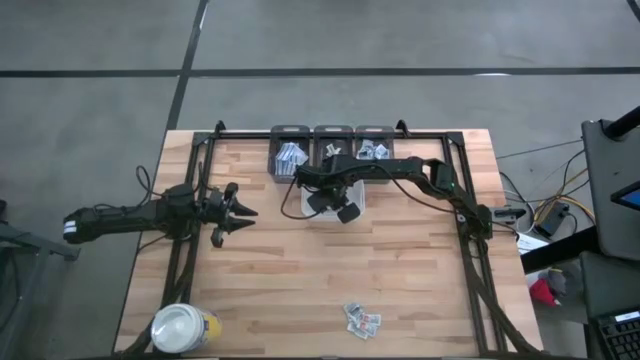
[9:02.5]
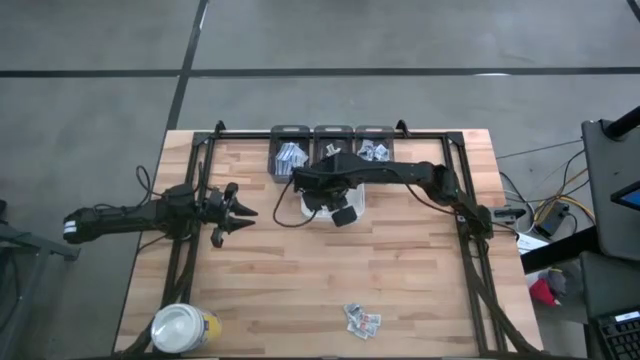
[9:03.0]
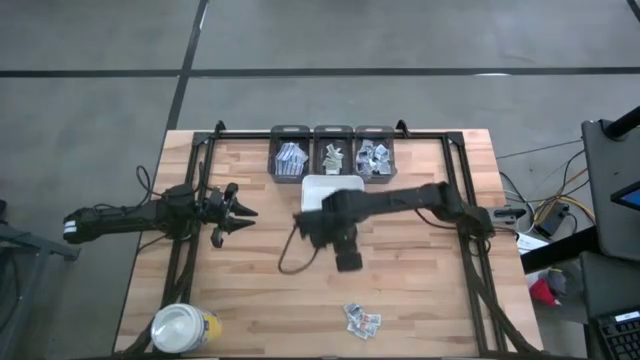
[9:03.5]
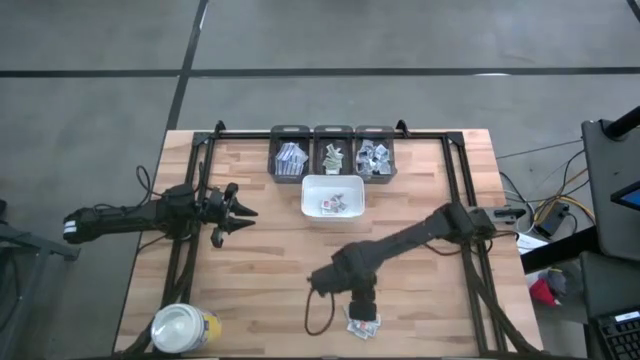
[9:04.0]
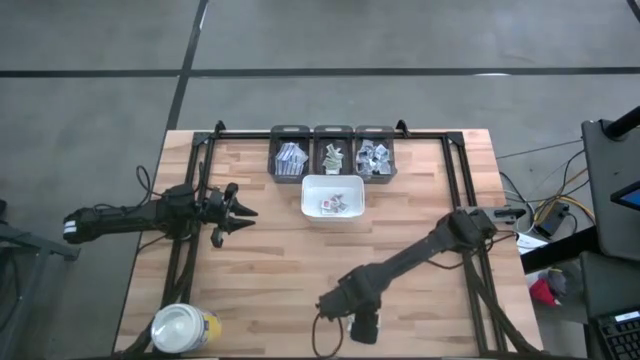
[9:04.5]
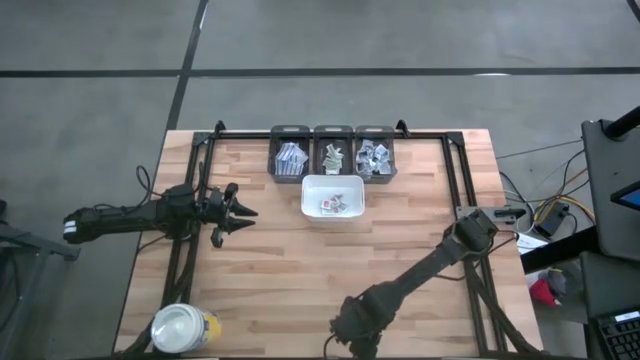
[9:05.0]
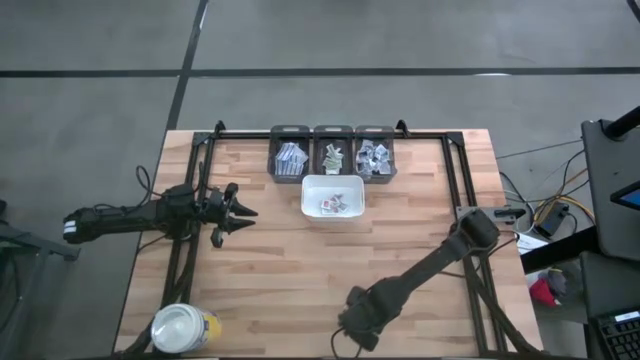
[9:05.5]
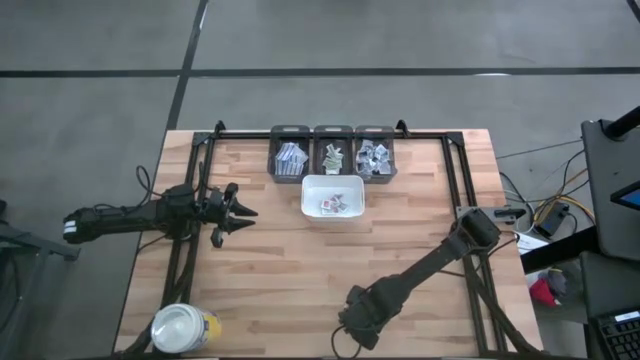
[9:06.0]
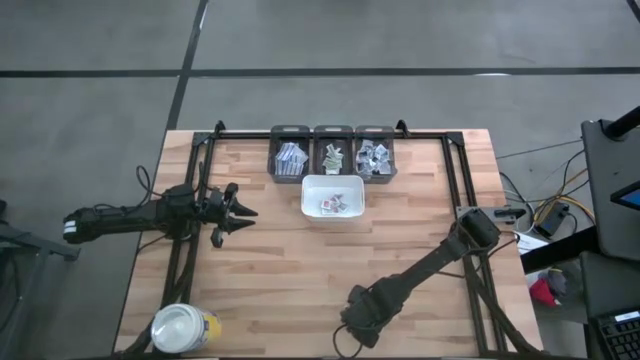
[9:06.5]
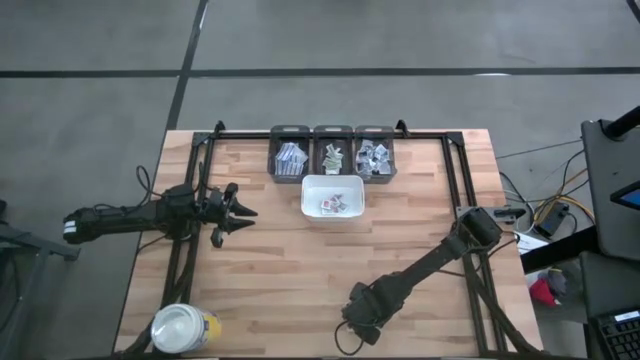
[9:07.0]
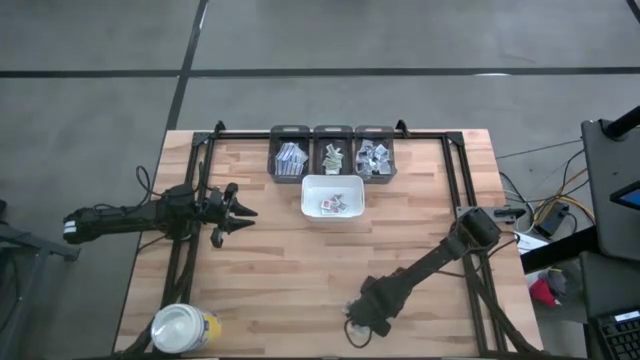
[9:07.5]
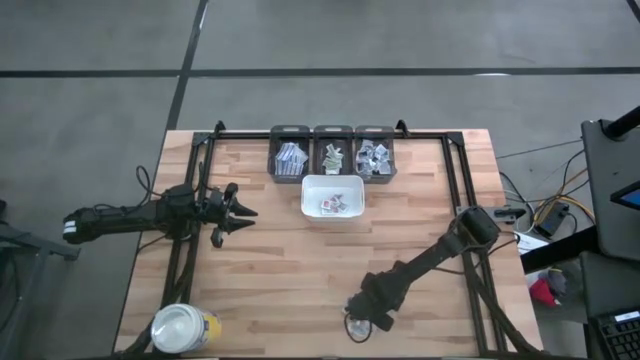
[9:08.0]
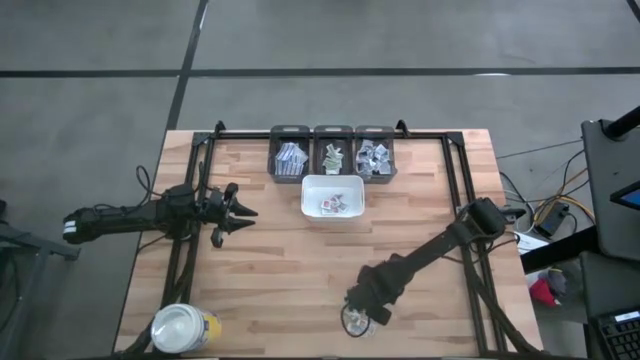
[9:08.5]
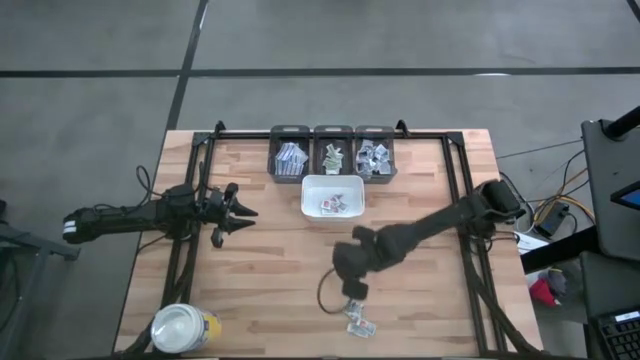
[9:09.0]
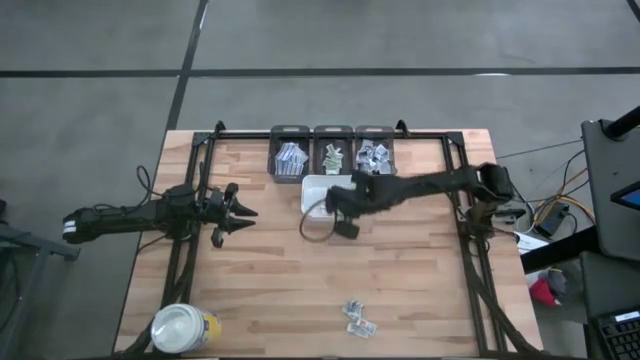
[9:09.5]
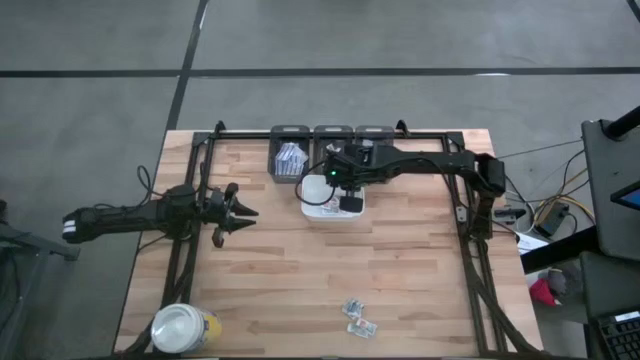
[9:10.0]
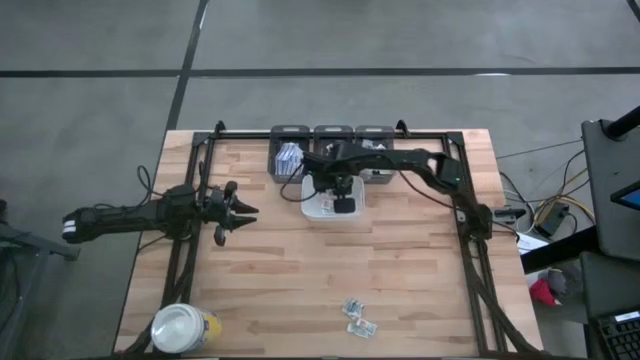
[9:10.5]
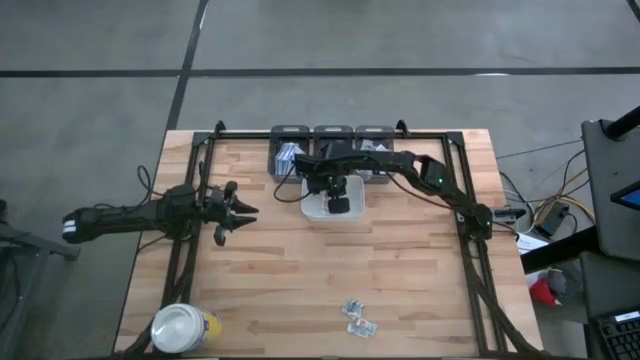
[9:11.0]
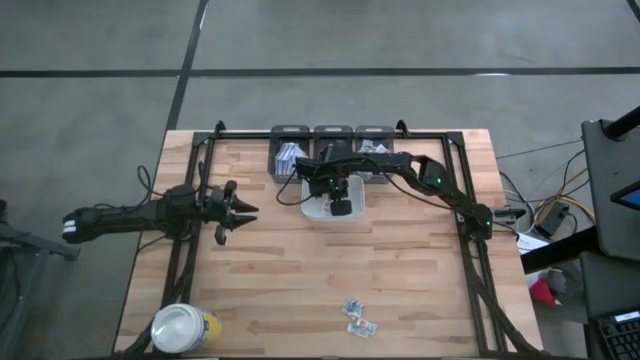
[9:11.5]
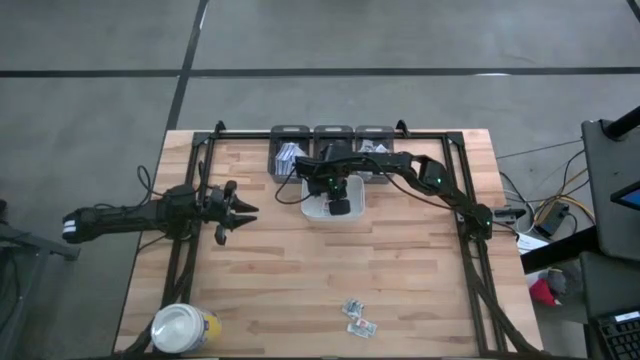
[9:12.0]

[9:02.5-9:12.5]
Task: Pick & Place First Aid Supplies
Put the orange ointment pack into the white bin

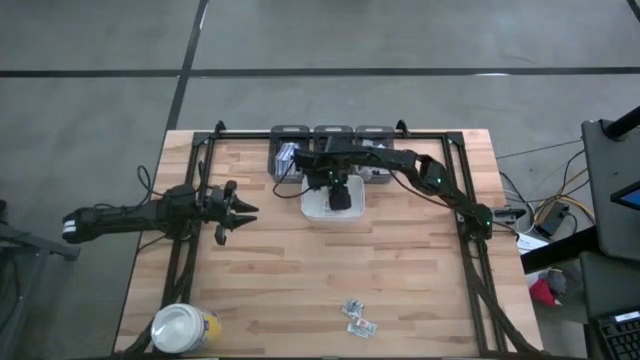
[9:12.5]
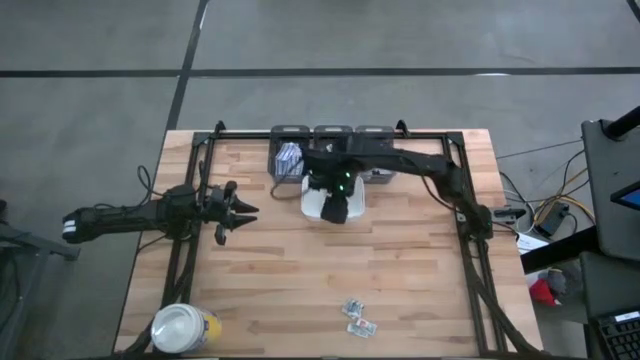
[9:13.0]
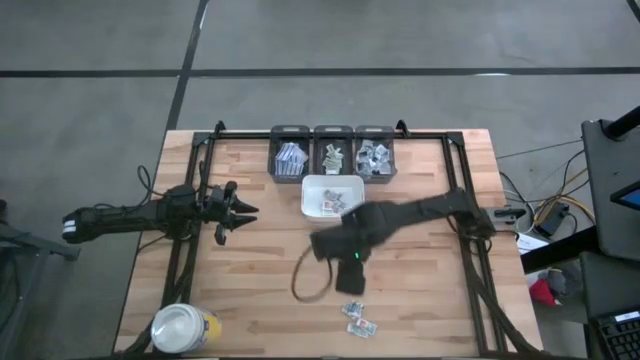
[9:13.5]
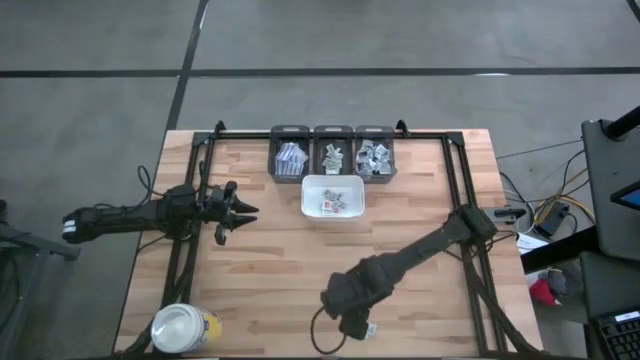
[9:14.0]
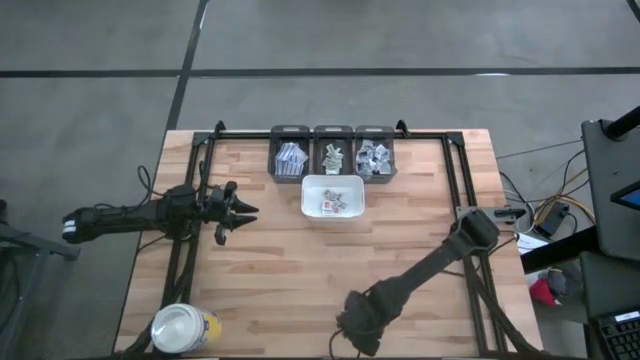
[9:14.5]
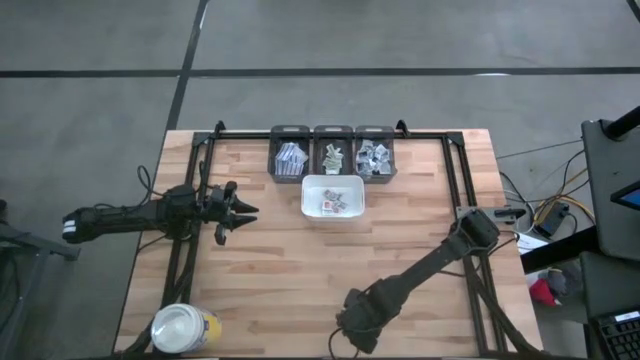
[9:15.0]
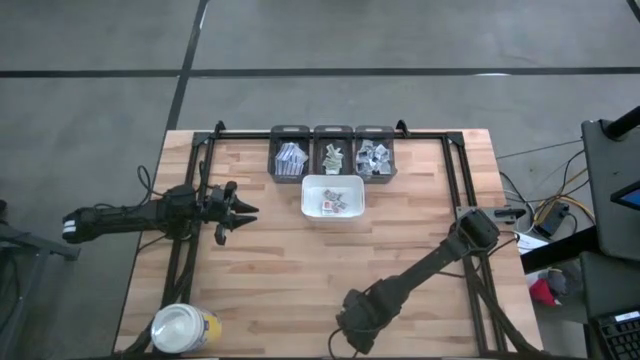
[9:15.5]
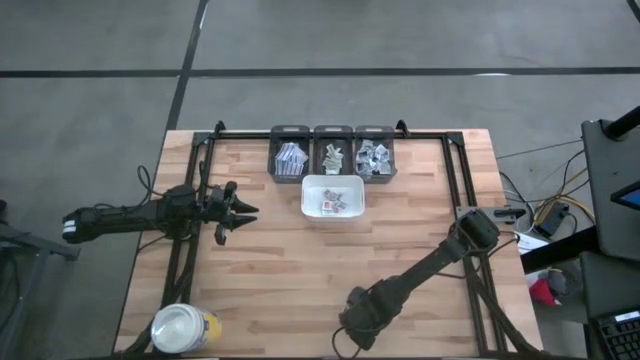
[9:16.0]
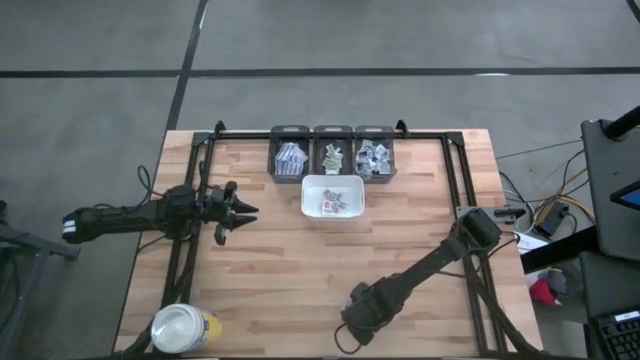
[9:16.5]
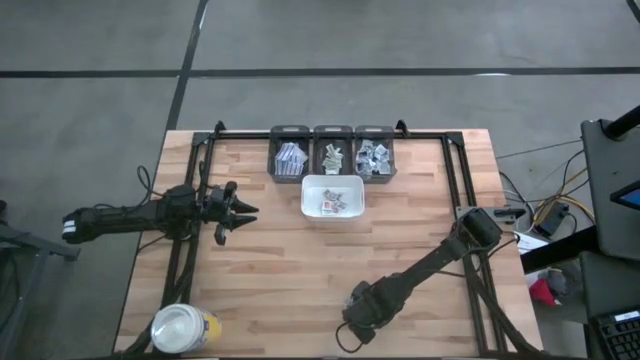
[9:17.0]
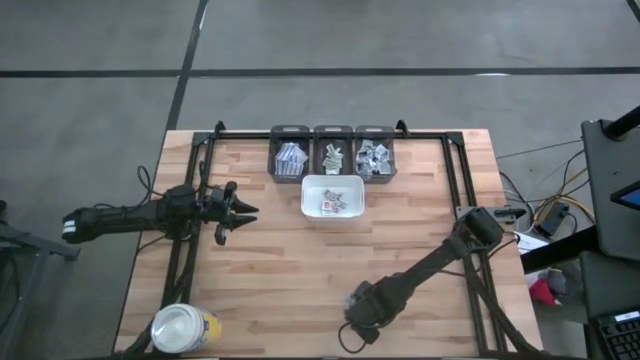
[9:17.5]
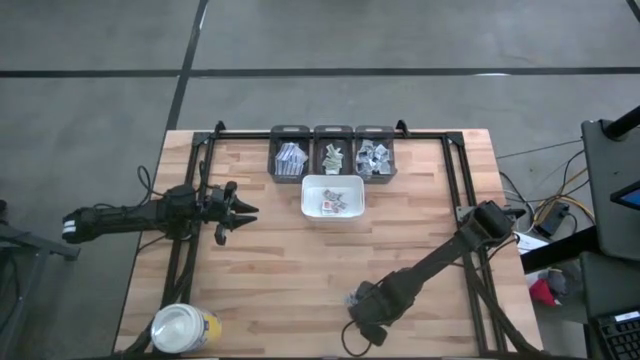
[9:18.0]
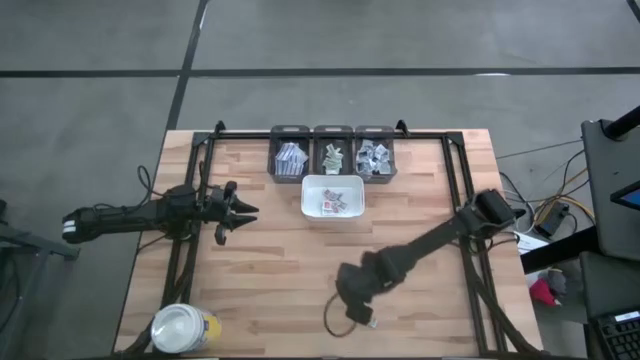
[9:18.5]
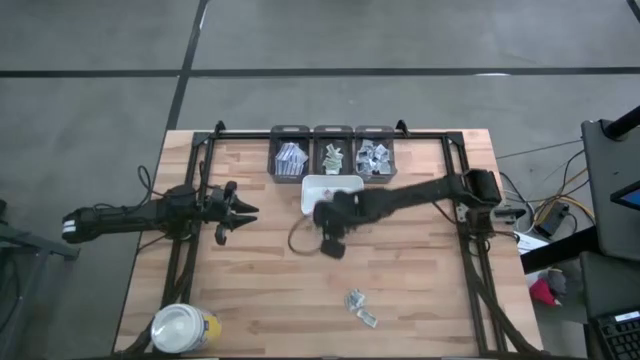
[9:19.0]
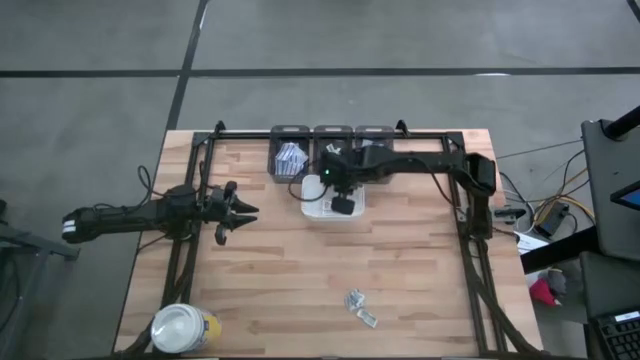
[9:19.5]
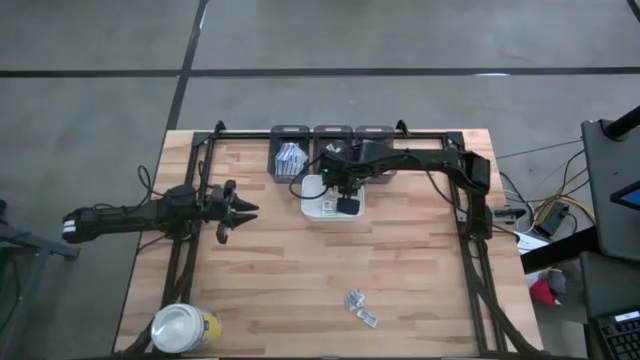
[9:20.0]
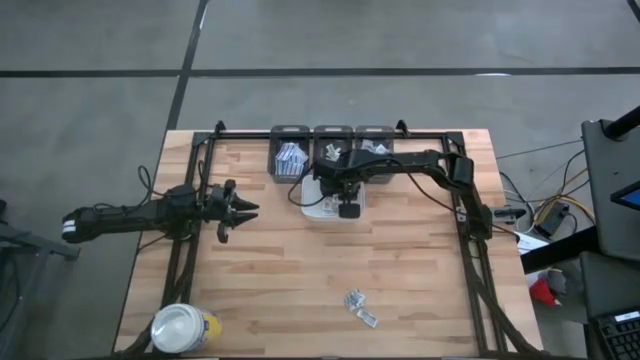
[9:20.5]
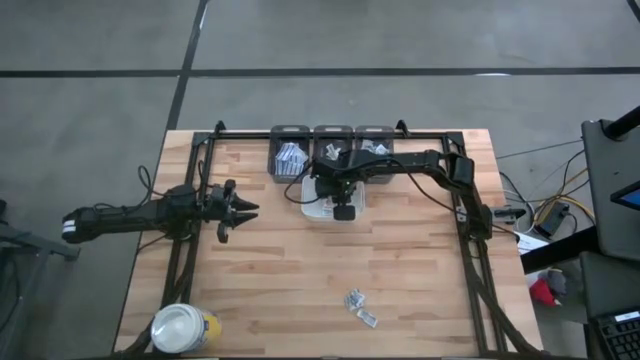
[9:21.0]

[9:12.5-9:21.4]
Put the orange ointment pack into the white bin

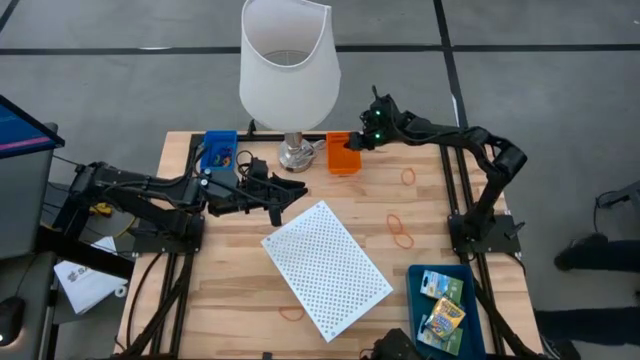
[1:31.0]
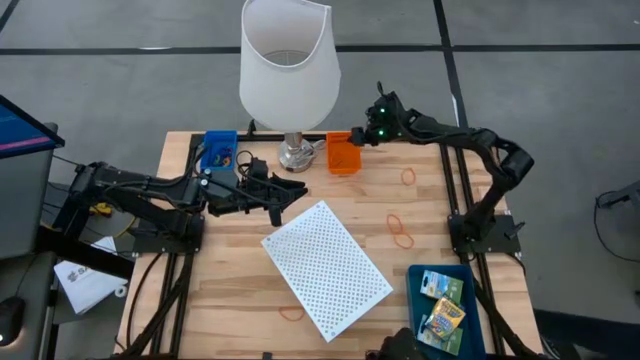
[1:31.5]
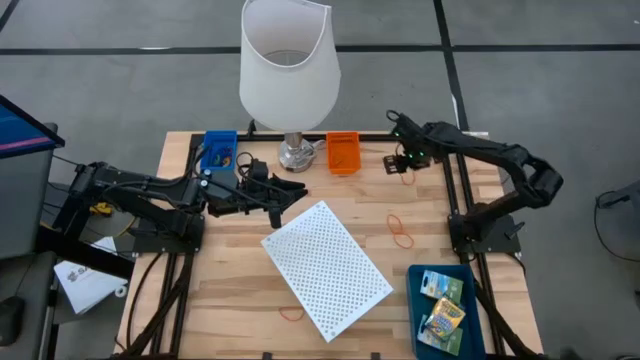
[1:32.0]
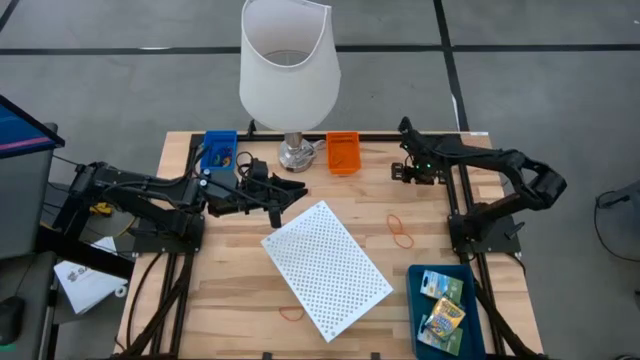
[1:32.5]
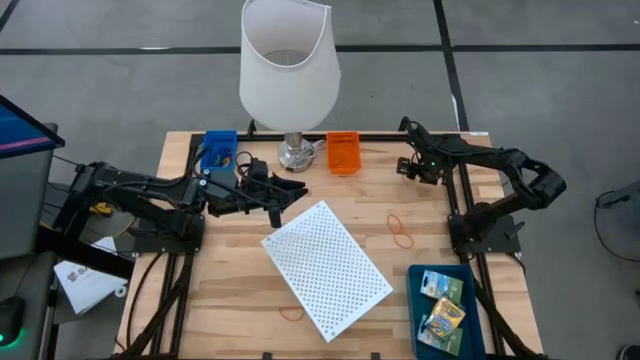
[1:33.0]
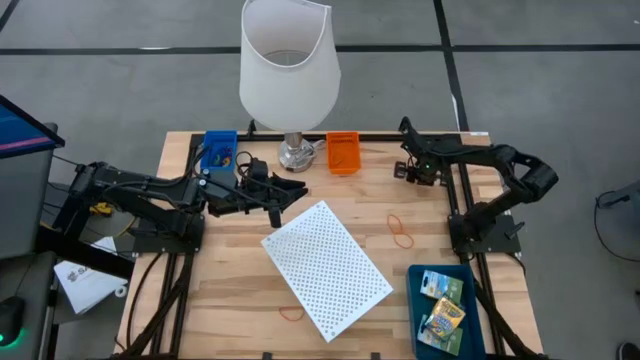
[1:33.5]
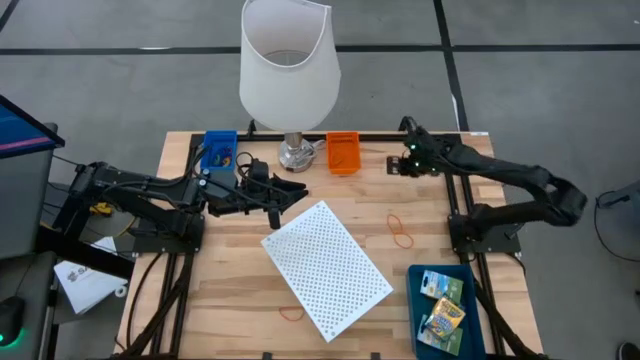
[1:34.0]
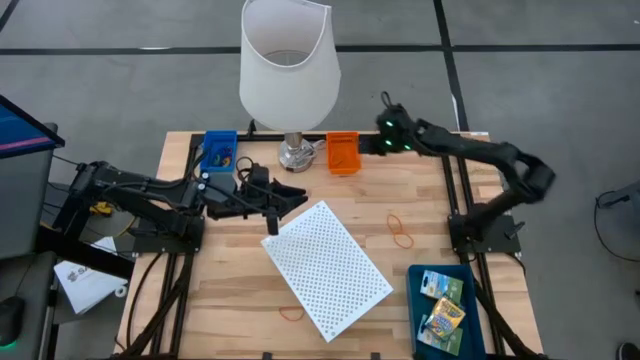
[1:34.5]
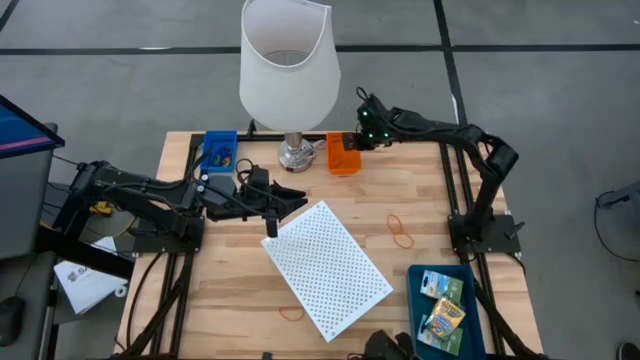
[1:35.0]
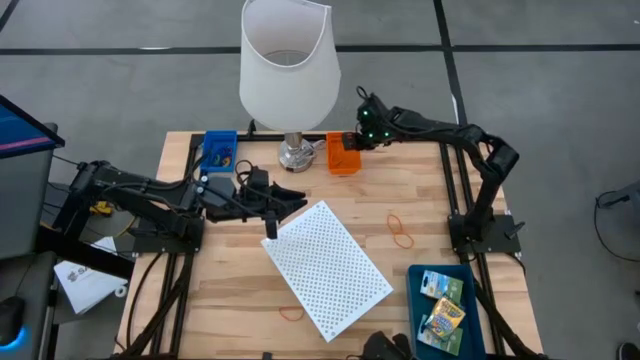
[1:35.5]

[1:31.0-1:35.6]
Task: Pick & Place Office Desk Supplies
Put the orange rubber band into the blue bin
